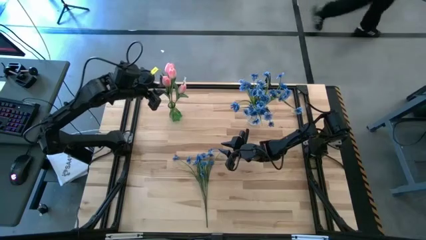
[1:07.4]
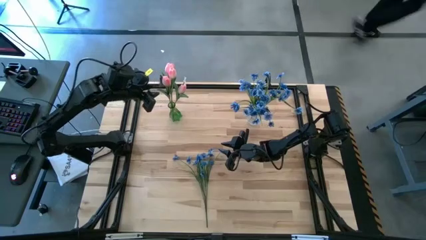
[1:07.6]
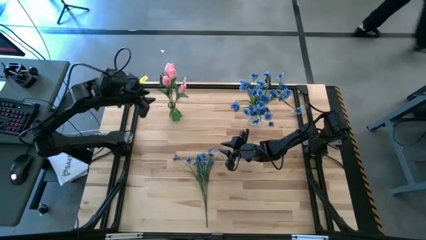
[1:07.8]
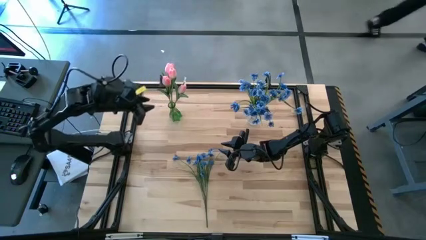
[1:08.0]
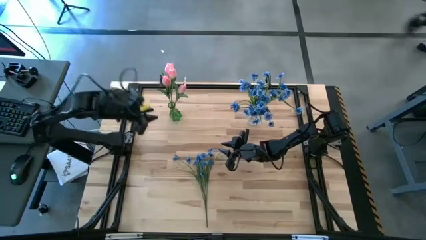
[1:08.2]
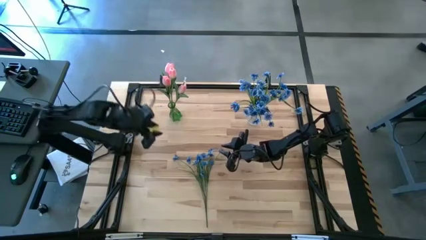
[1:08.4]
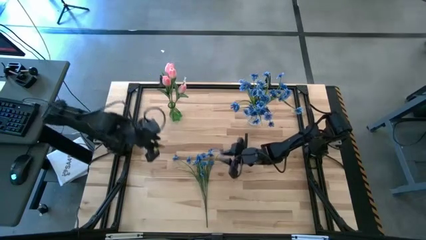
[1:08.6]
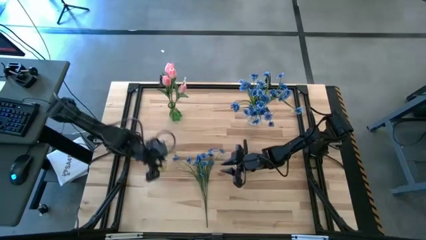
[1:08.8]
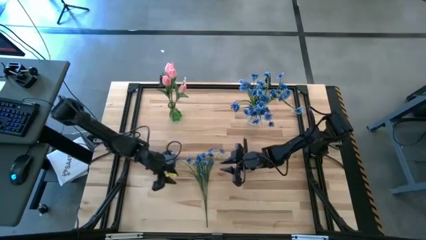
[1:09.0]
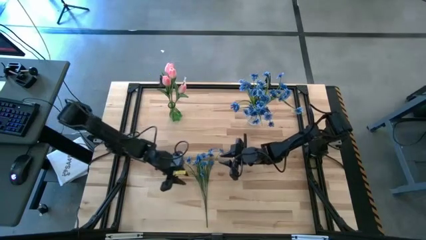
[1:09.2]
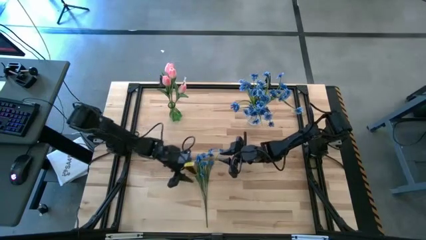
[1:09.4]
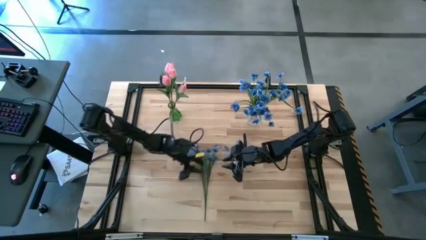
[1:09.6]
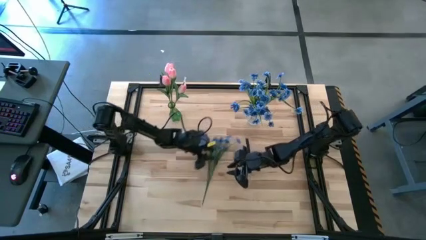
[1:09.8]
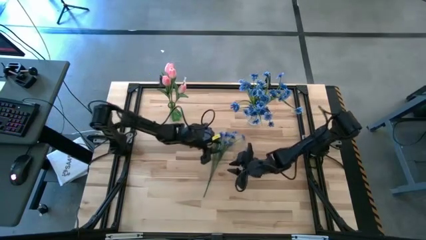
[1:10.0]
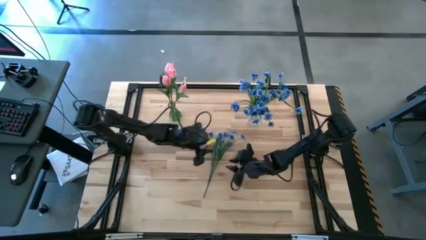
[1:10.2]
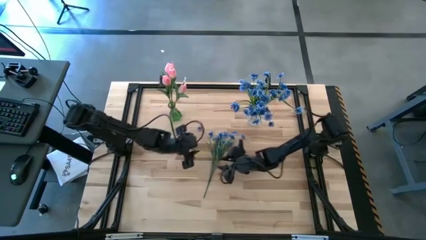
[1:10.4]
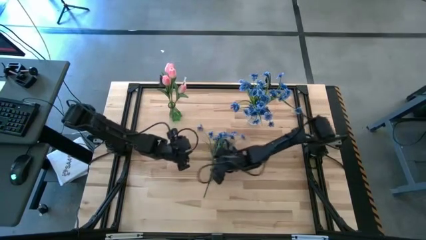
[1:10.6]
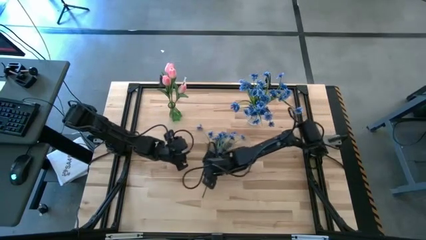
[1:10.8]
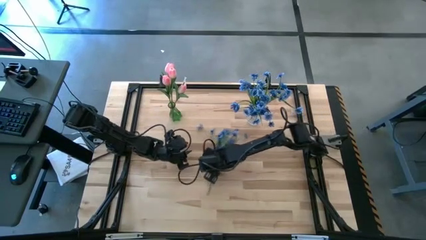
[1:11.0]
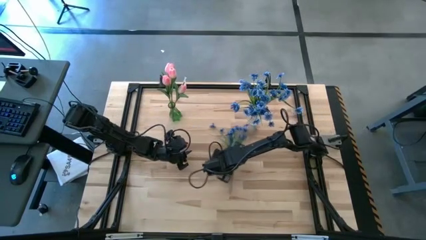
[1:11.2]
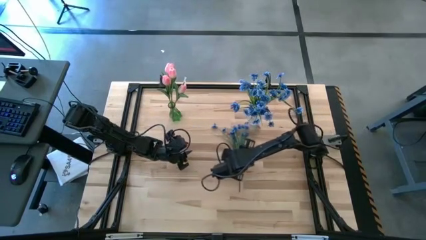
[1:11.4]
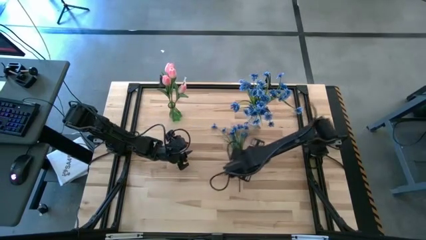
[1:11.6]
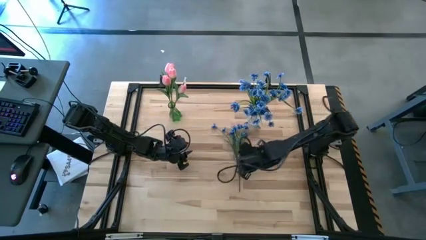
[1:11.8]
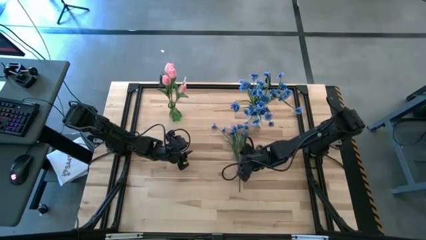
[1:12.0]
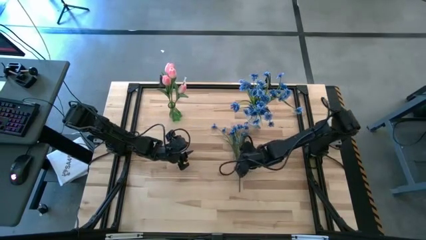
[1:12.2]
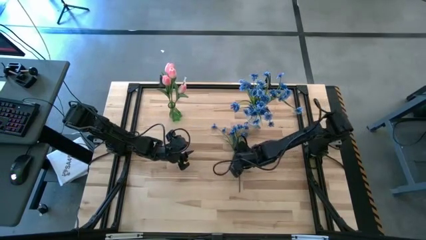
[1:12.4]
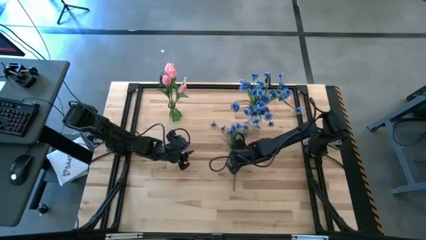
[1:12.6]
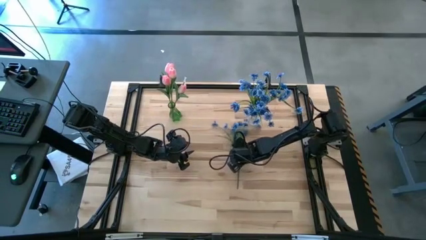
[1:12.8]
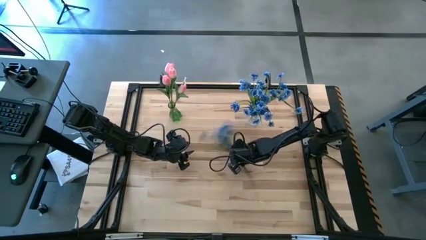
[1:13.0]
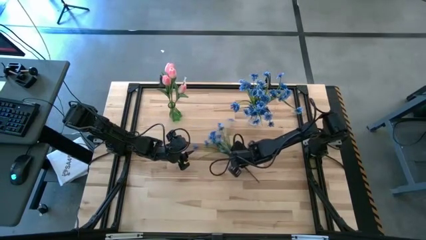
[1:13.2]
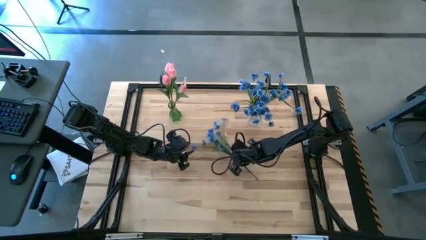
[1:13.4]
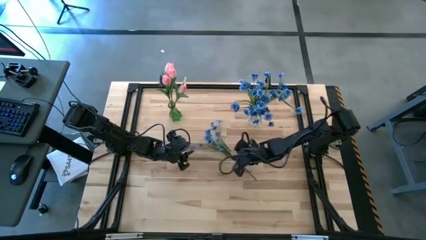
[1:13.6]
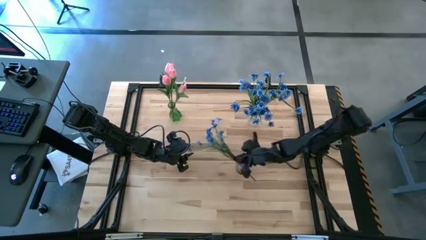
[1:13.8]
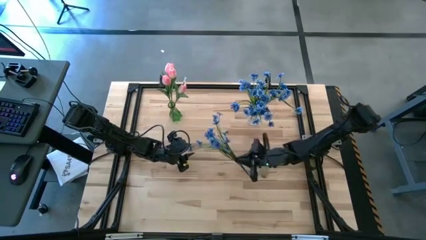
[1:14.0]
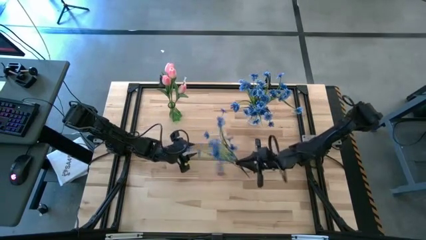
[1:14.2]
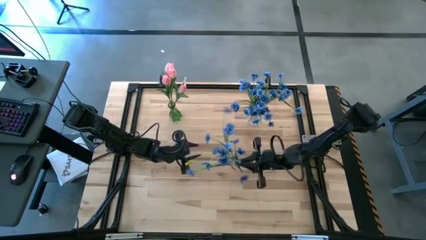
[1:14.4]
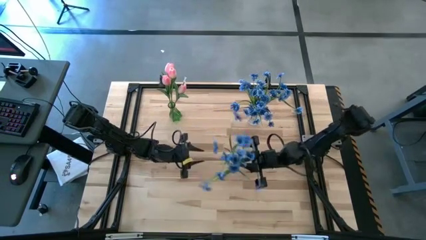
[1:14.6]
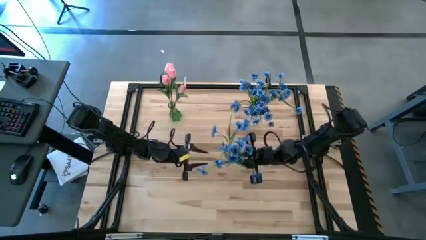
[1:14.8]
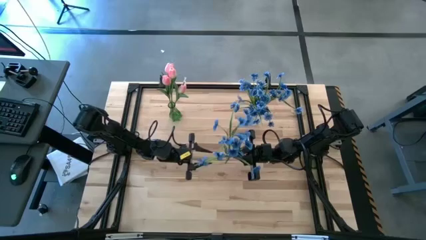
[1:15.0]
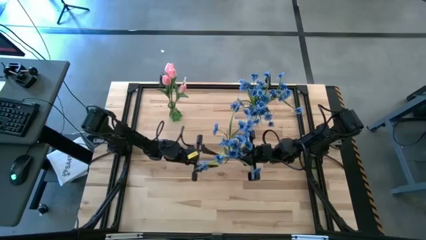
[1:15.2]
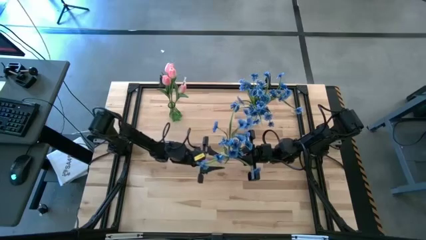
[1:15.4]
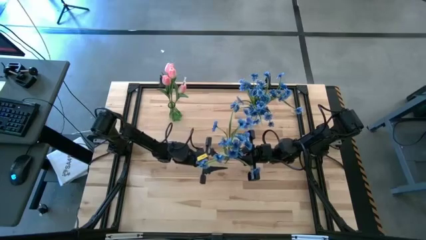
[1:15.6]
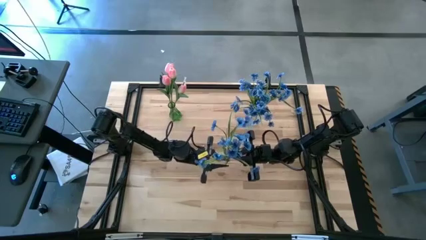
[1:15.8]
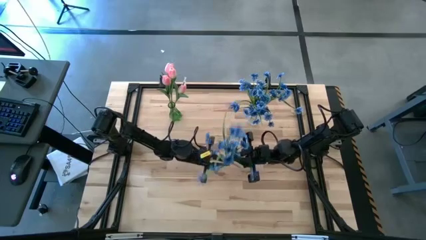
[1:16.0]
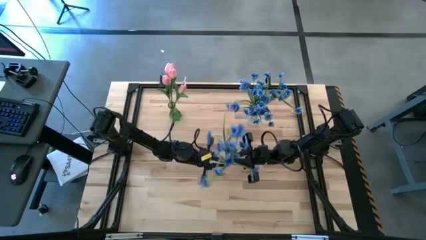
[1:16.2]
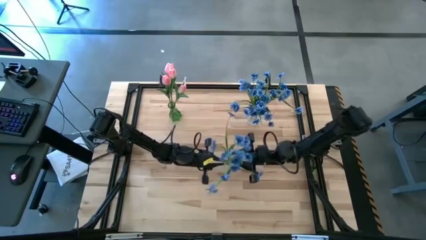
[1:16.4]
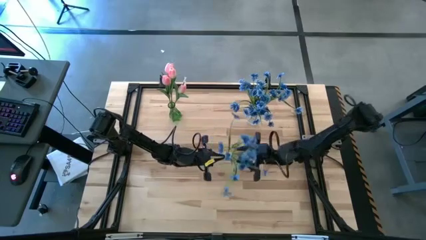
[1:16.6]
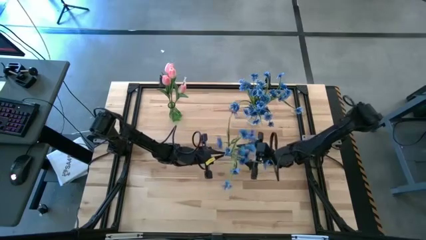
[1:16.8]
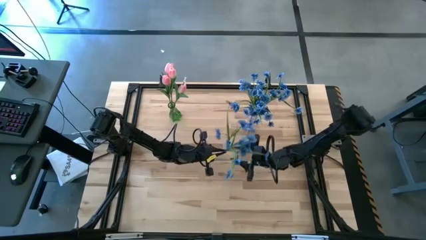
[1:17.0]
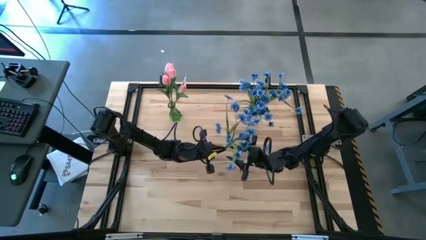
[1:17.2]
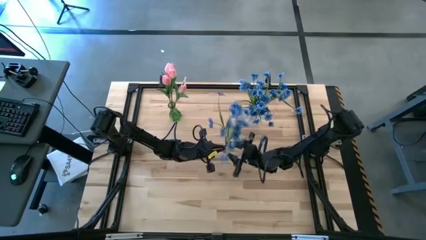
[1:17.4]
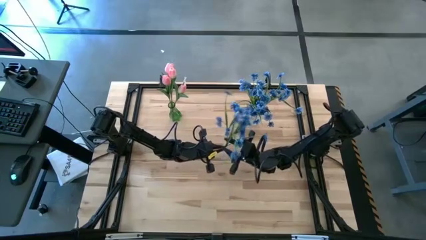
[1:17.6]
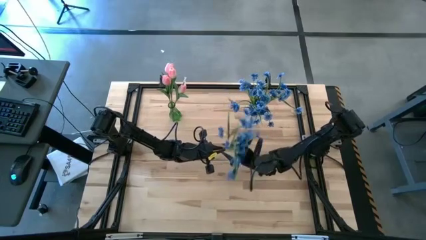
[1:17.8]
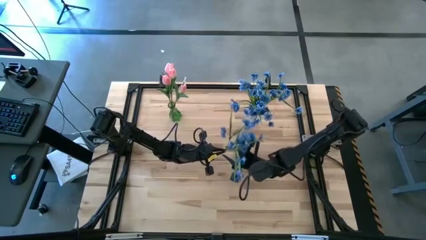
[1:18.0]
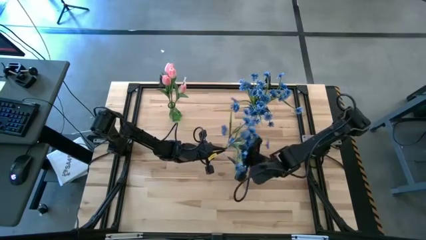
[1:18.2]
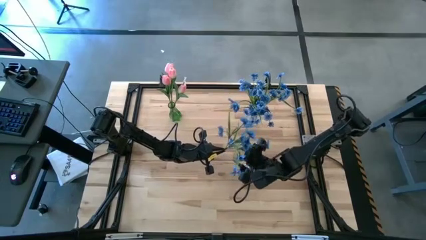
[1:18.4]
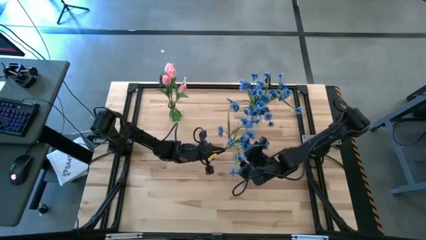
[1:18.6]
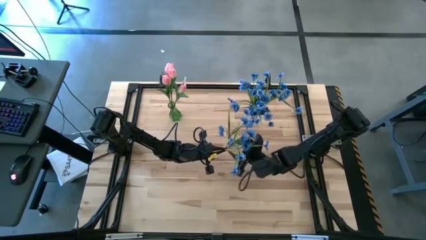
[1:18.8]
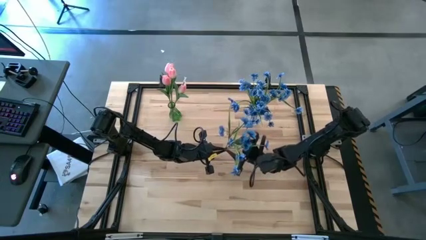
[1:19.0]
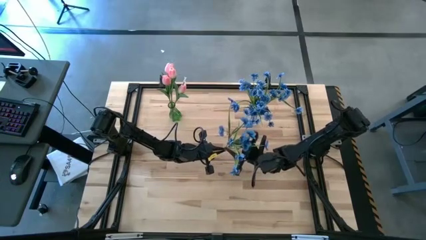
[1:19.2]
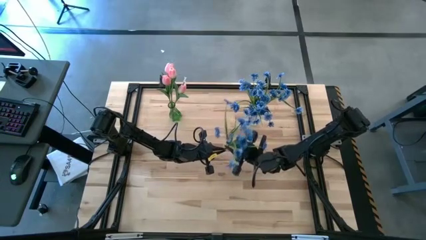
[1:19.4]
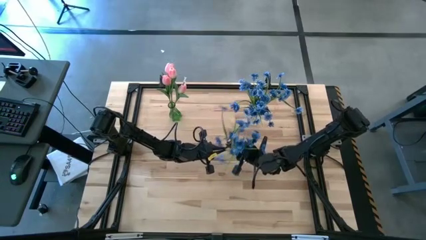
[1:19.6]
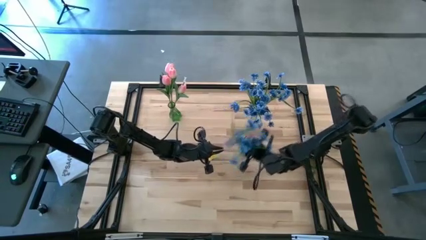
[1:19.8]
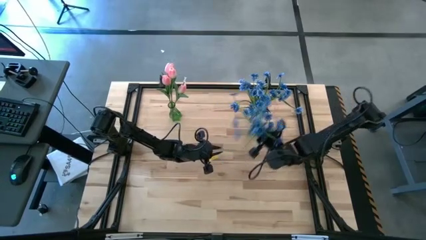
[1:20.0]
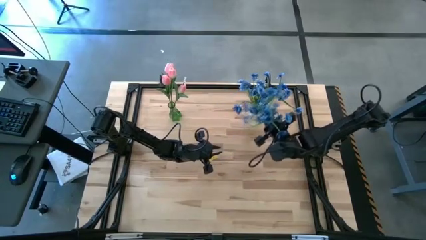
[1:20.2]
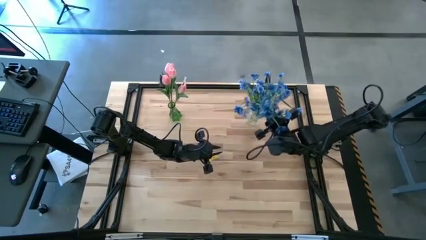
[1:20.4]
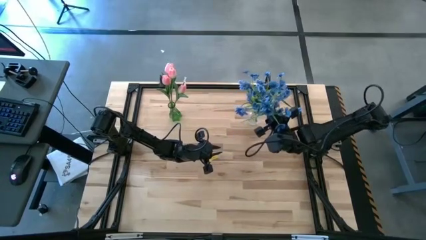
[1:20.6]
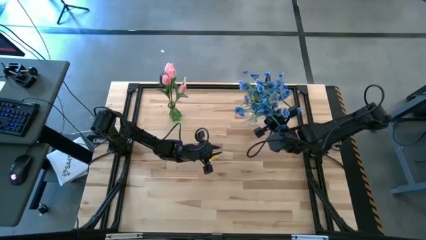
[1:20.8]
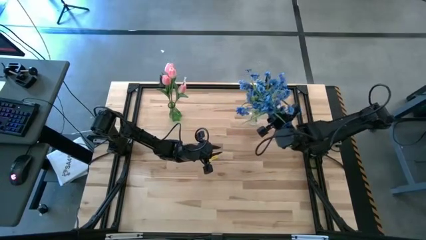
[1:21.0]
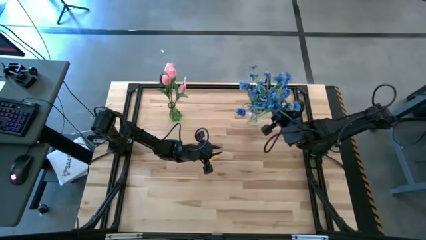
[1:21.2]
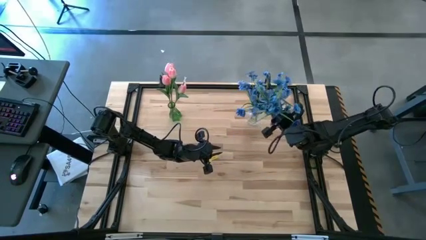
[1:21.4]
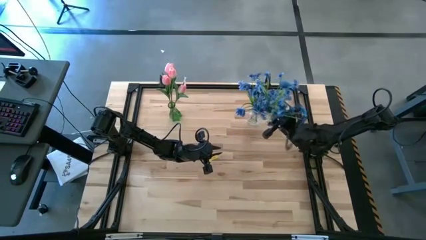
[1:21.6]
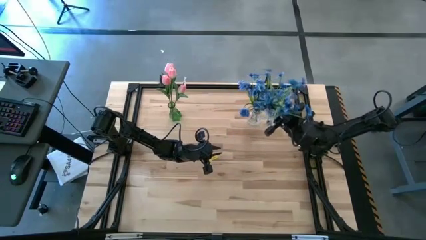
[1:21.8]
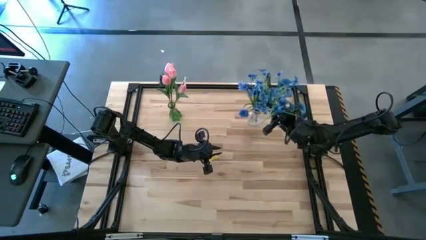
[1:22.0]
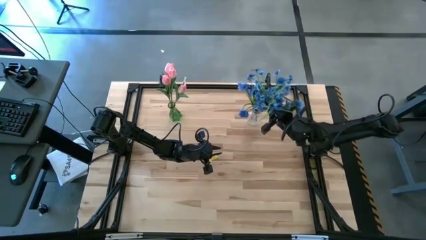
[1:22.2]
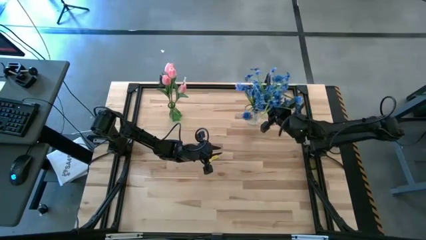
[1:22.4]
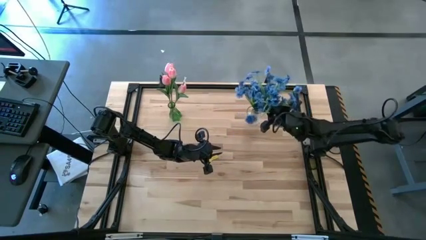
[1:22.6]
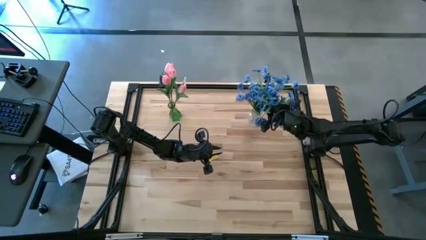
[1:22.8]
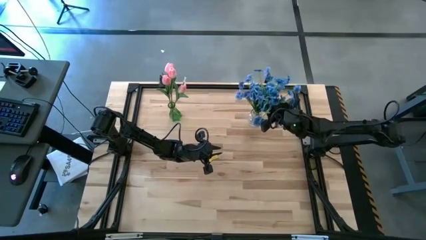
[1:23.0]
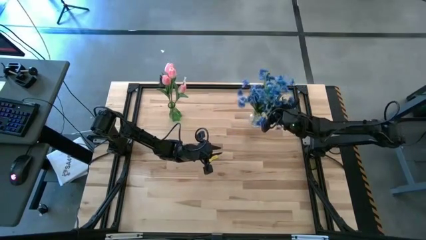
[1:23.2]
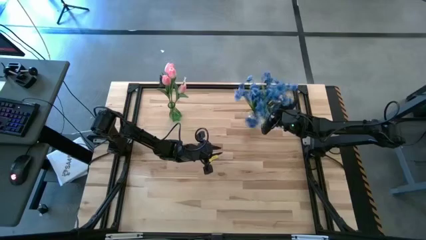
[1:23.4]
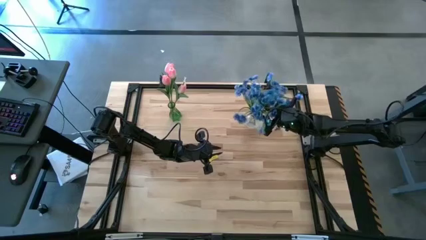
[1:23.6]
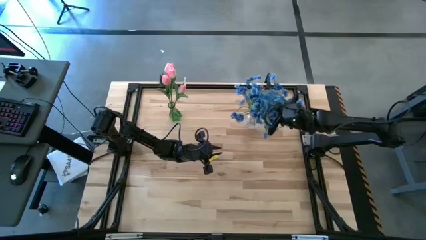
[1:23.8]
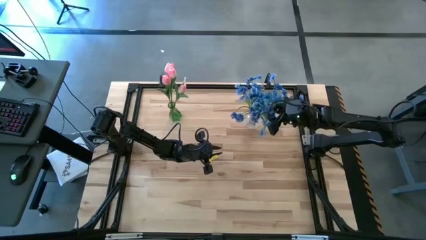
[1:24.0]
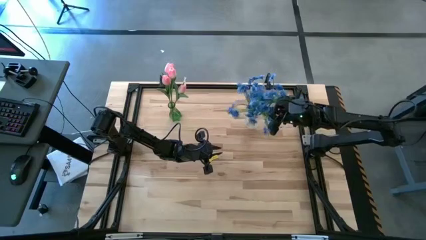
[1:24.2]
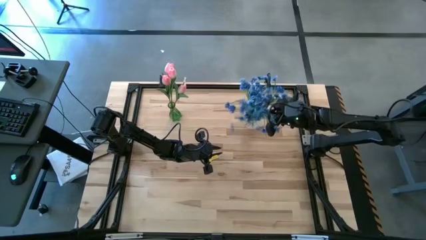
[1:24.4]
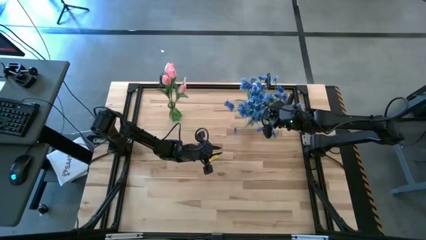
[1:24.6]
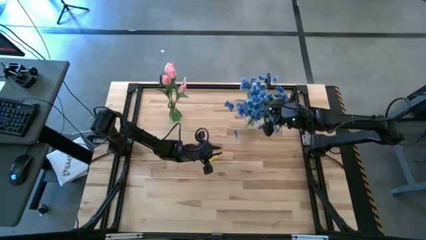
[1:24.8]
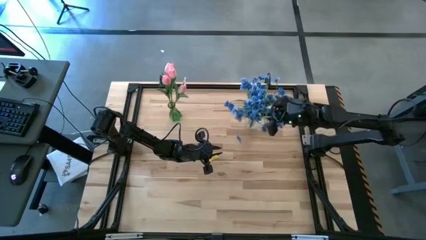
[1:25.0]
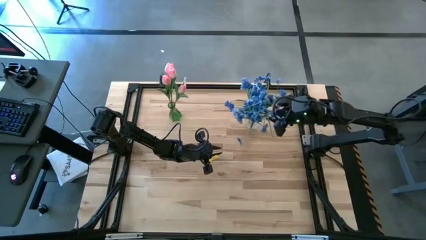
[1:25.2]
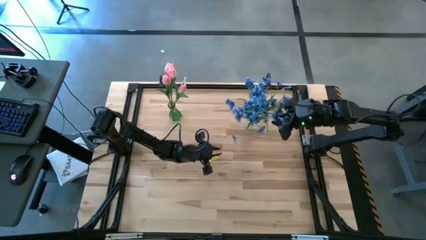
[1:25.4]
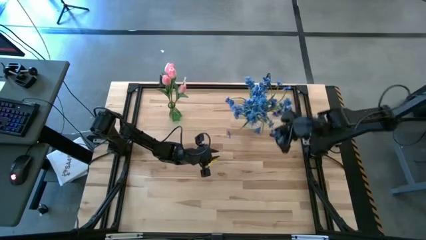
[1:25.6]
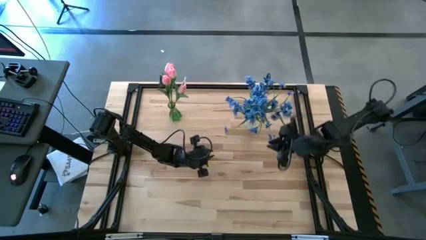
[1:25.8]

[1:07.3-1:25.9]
Task: Sort flowers into vase by color
Put the blue flowers into the transparent vase
